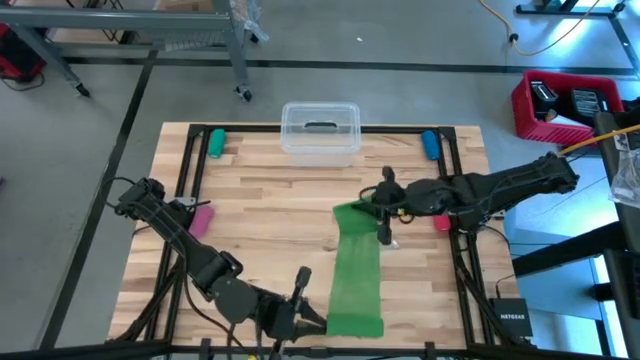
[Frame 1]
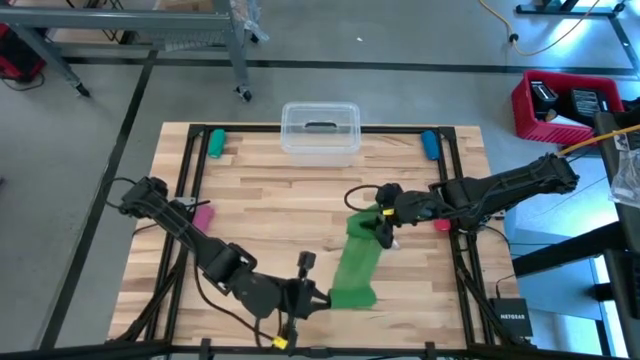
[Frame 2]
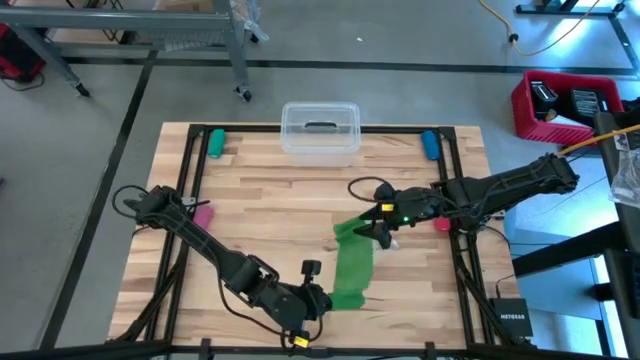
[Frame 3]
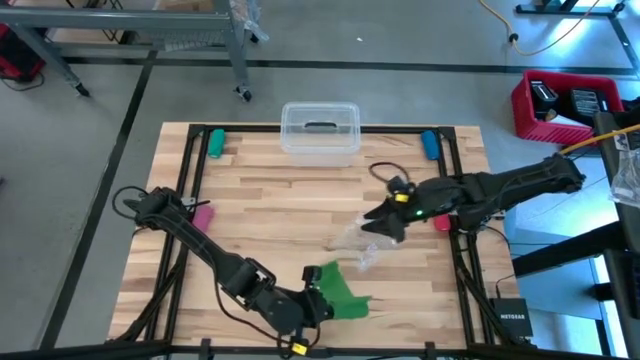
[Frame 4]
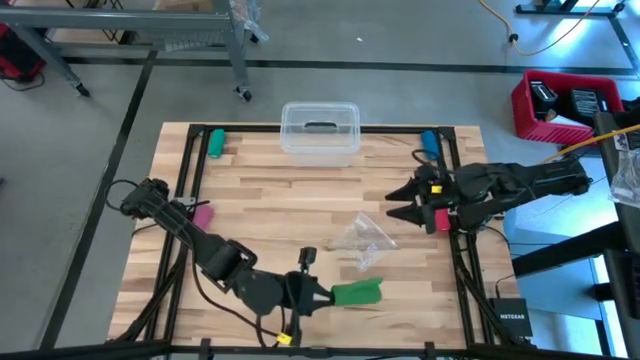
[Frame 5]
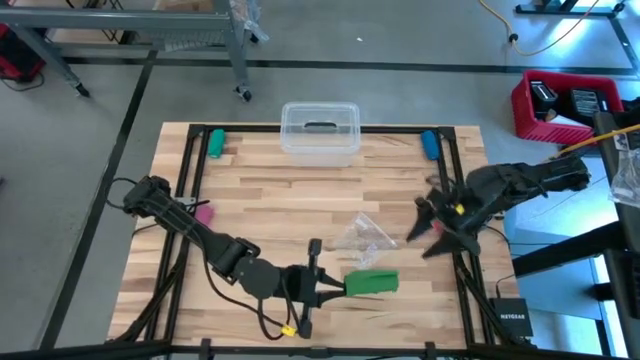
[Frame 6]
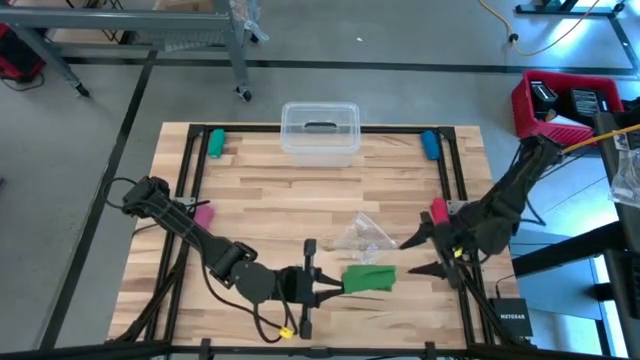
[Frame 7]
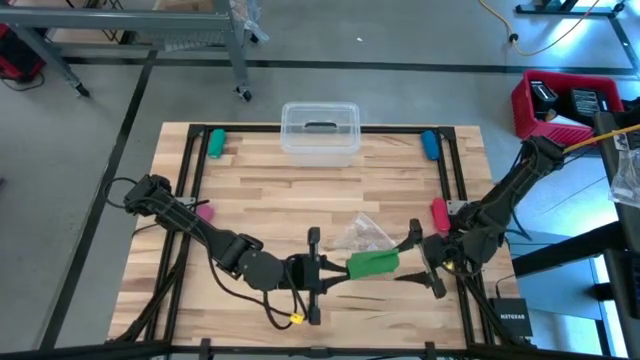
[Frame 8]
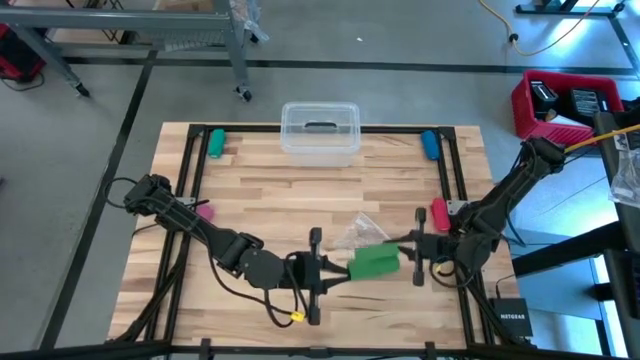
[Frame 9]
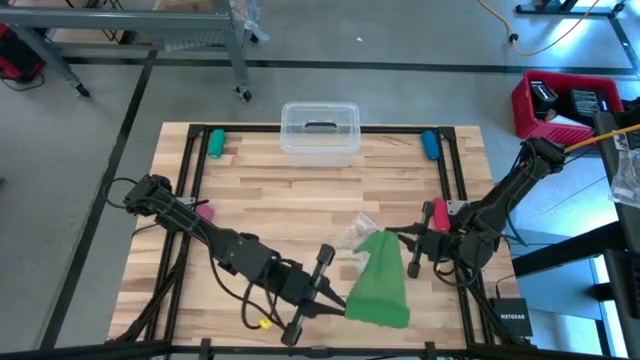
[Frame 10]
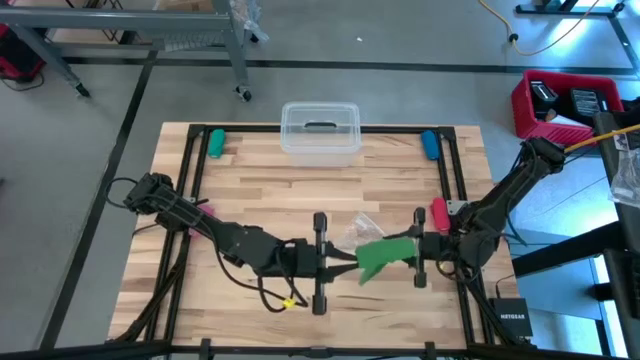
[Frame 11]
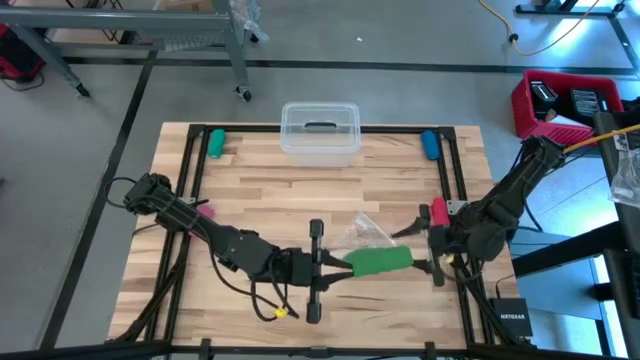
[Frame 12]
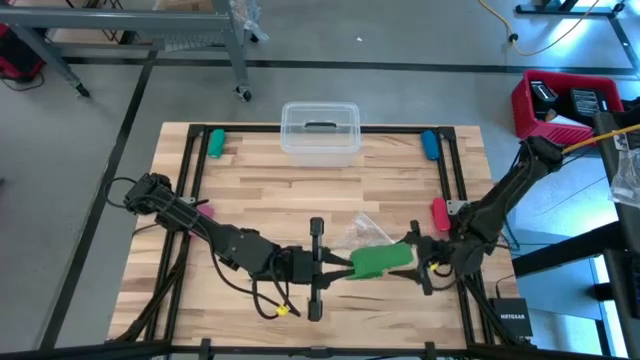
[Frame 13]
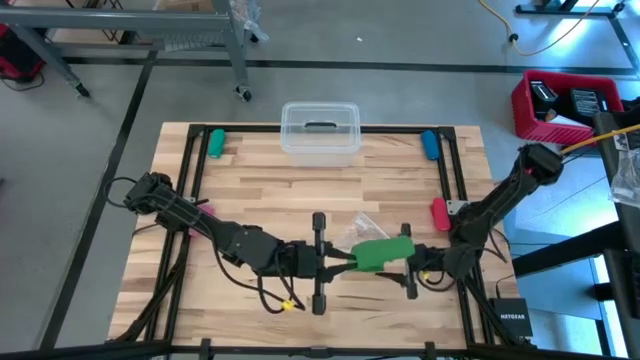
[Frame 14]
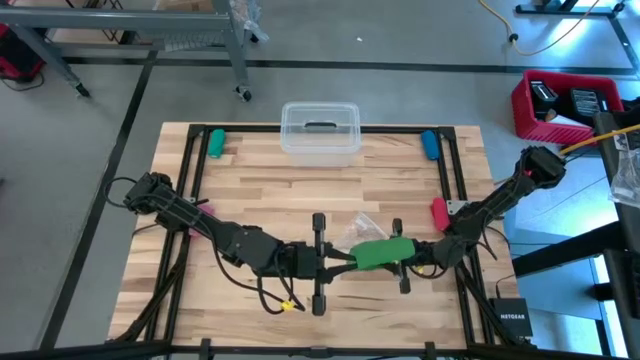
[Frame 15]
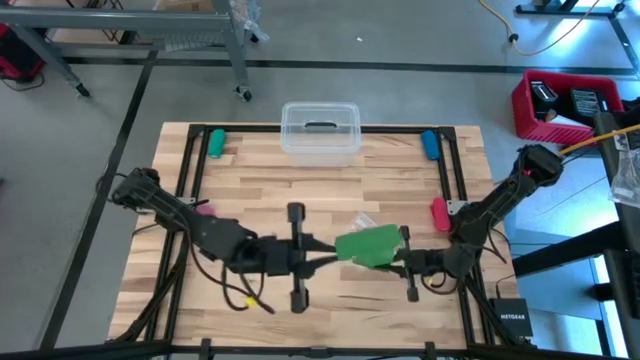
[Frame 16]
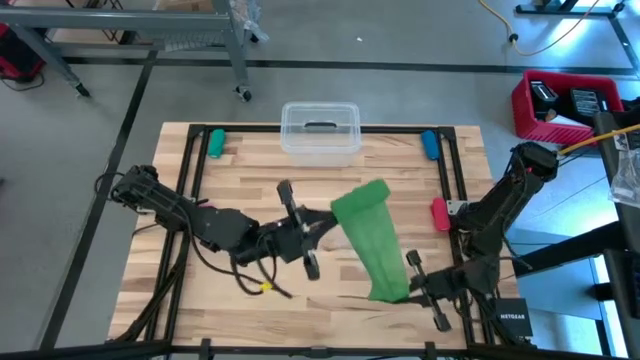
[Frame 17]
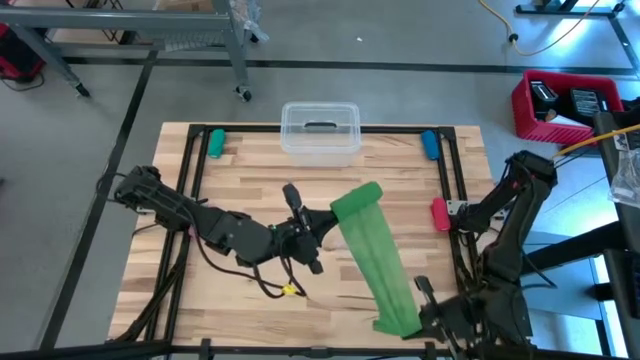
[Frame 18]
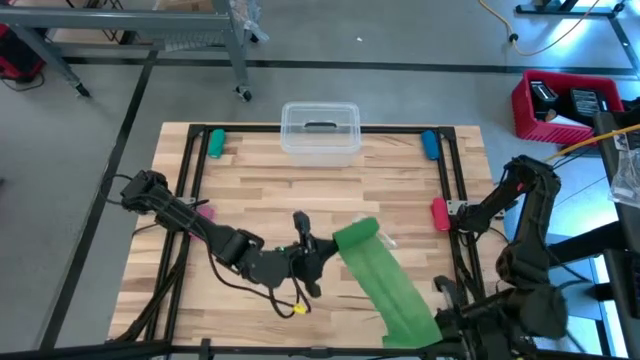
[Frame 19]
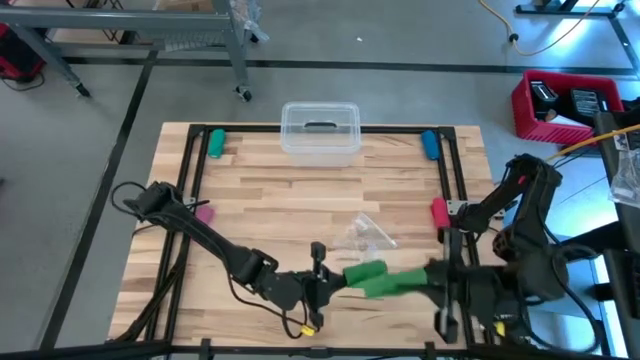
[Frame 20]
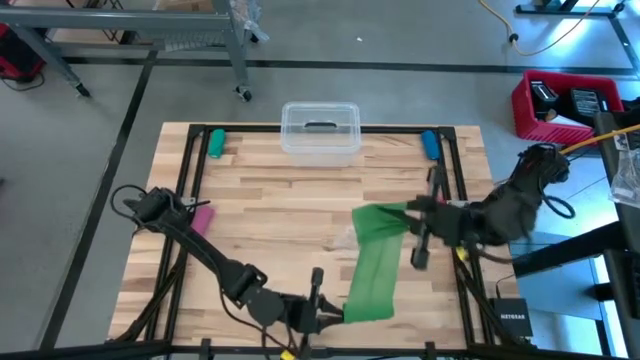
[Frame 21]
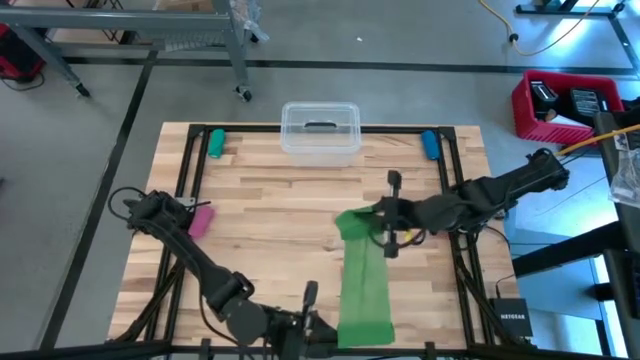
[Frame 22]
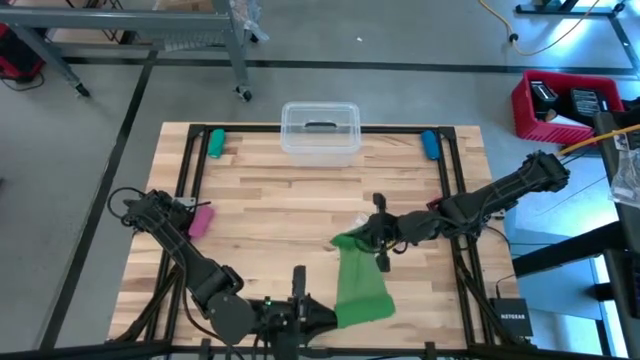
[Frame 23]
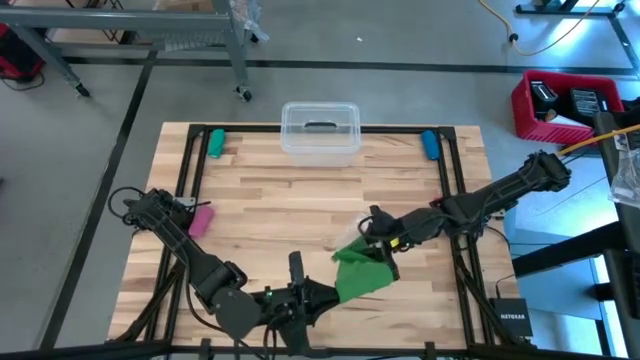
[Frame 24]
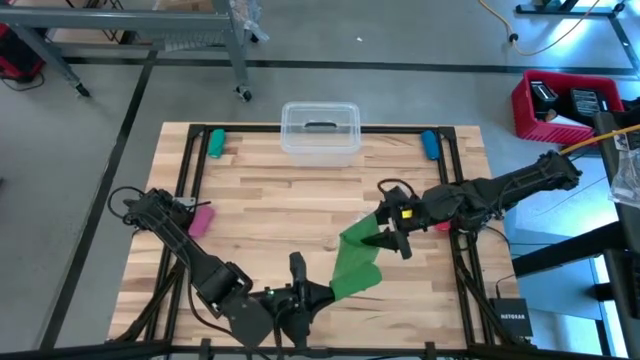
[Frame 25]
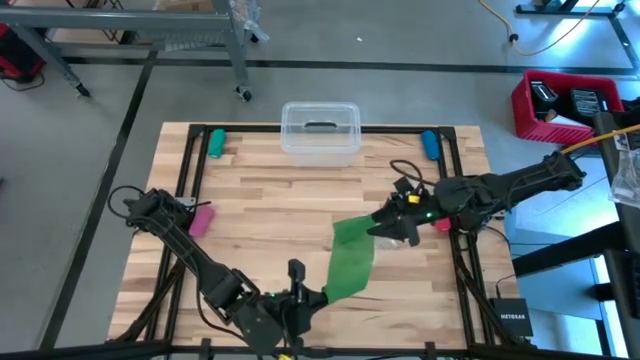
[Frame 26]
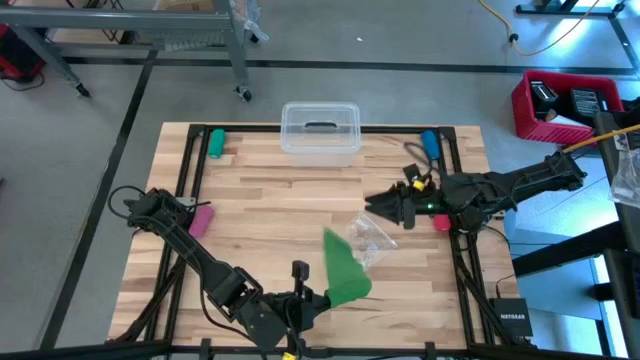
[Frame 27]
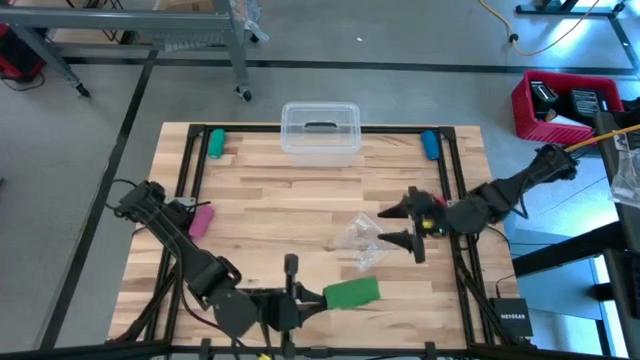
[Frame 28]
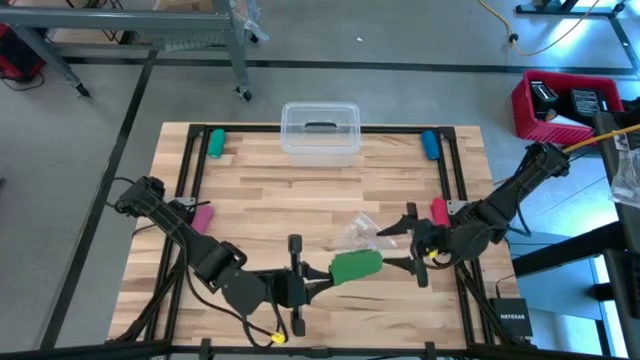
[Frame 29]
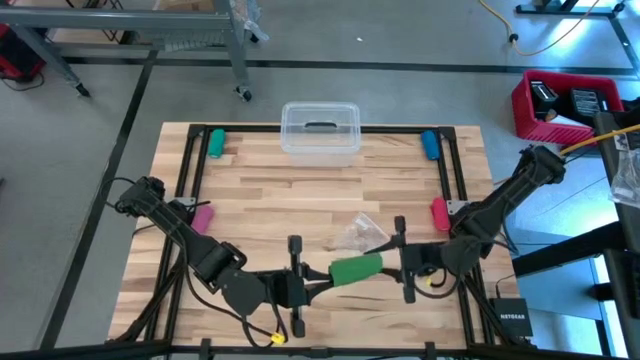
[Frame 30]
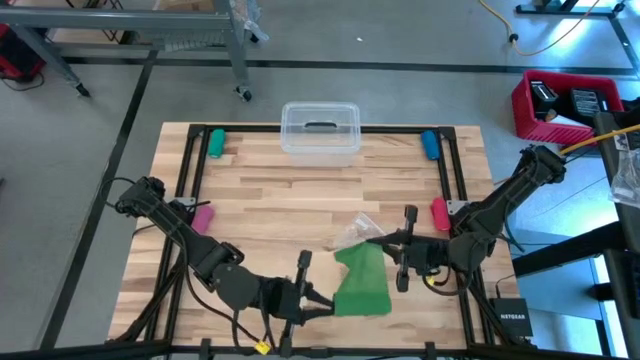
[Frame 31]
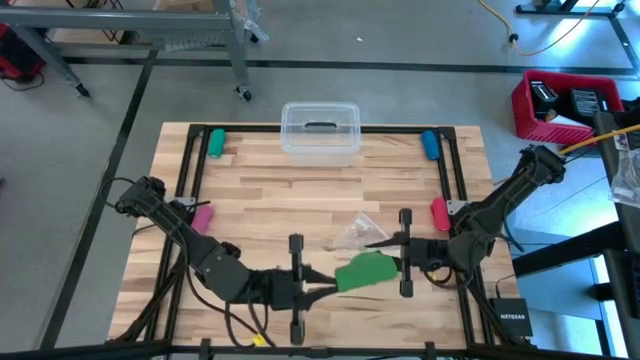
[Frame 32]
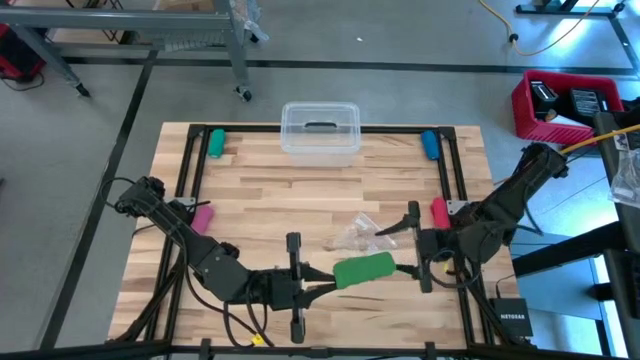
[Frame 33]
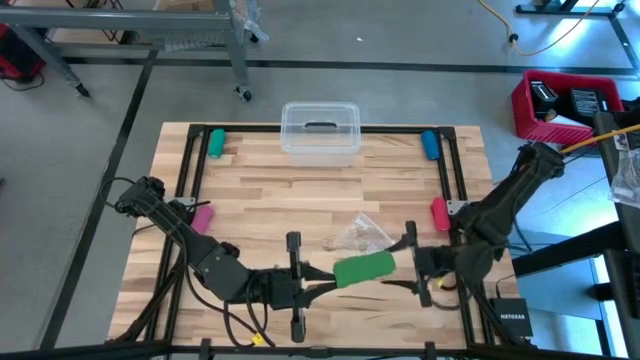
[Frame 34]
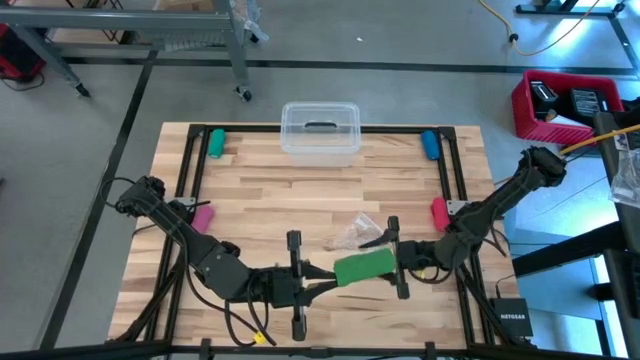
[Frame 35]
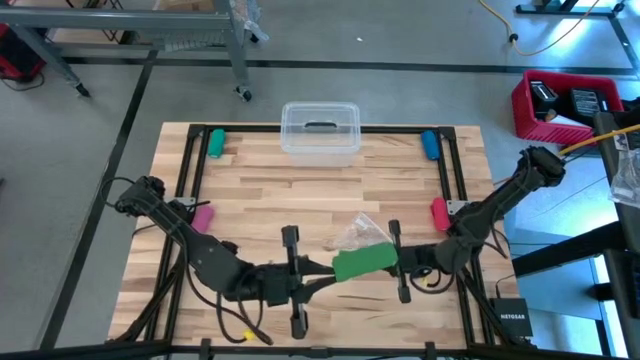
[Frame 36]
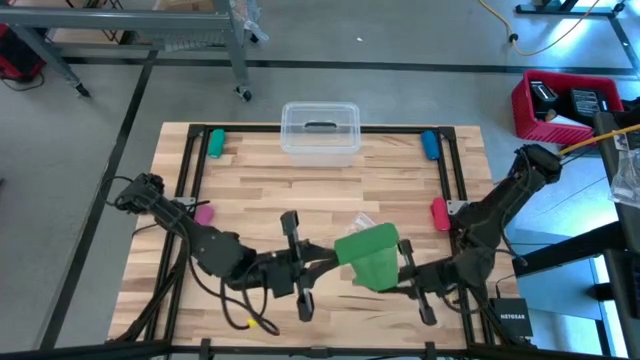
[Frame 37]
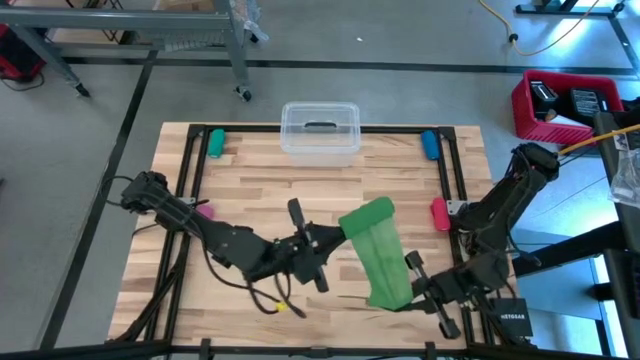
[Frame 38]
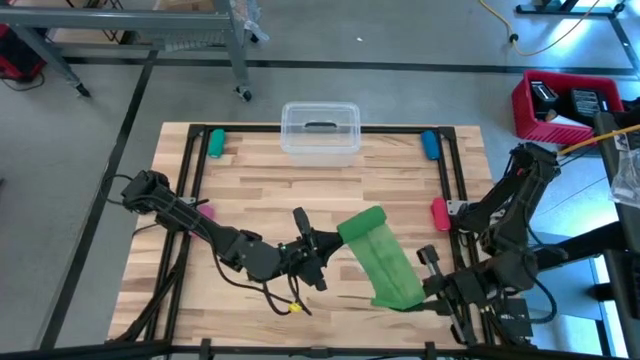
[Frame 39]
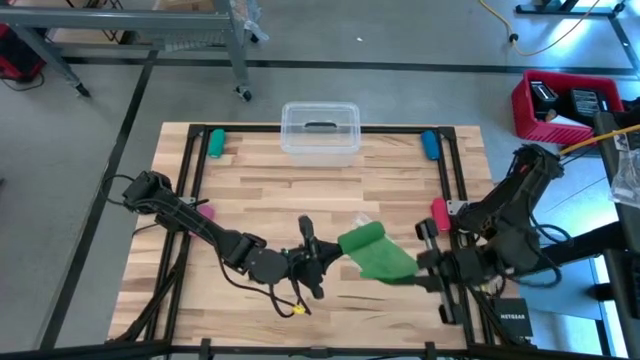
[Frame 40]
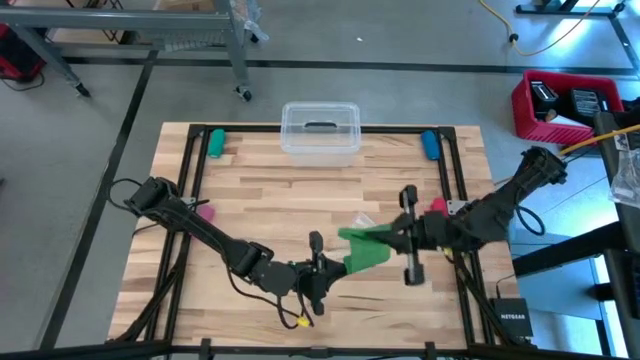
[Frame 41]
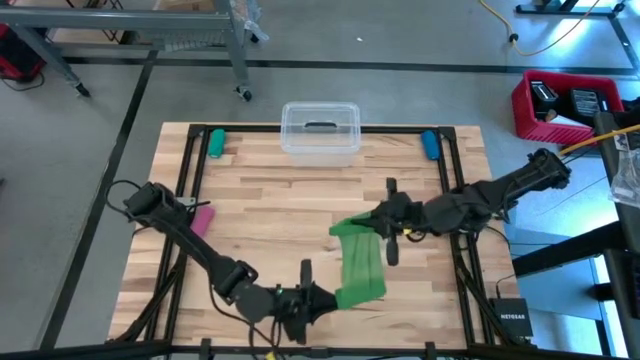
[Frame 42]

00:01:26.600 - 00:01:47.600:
Task: Roll bandage
Roll the green bandage
